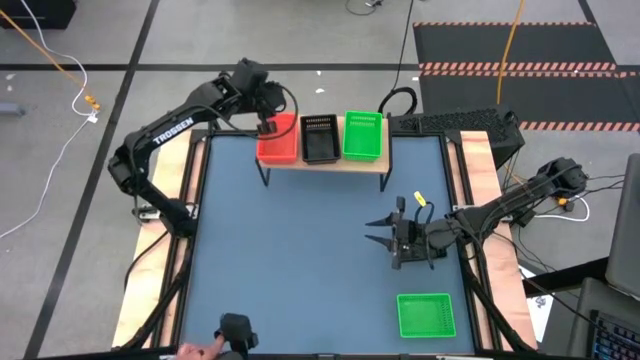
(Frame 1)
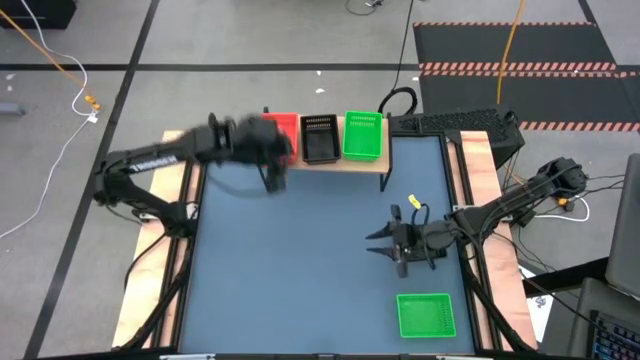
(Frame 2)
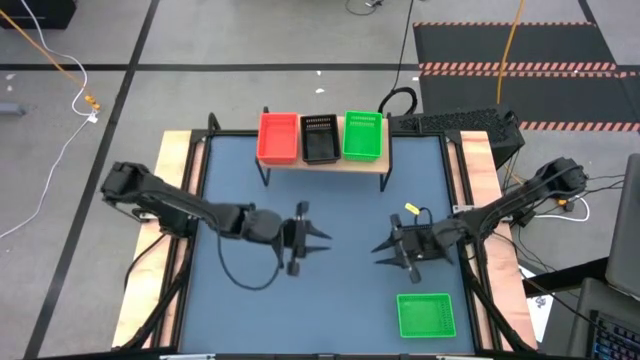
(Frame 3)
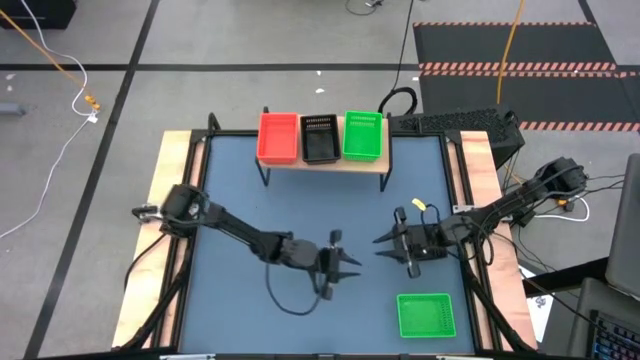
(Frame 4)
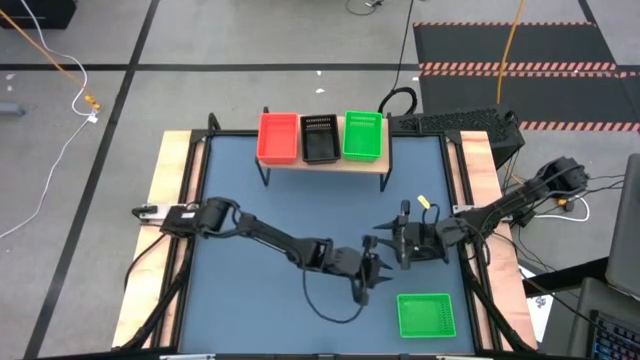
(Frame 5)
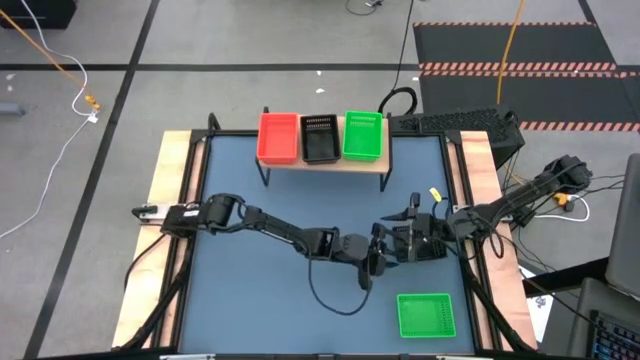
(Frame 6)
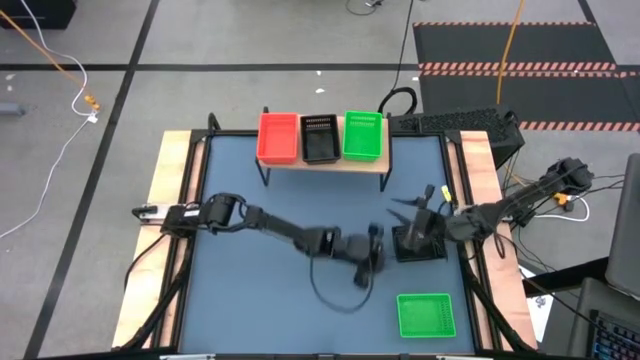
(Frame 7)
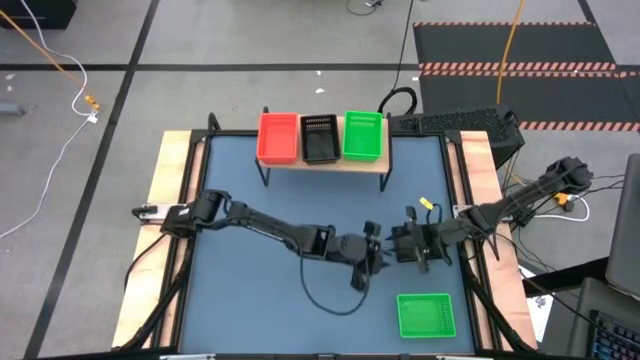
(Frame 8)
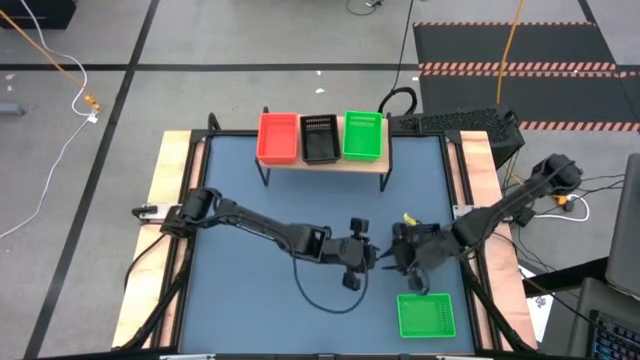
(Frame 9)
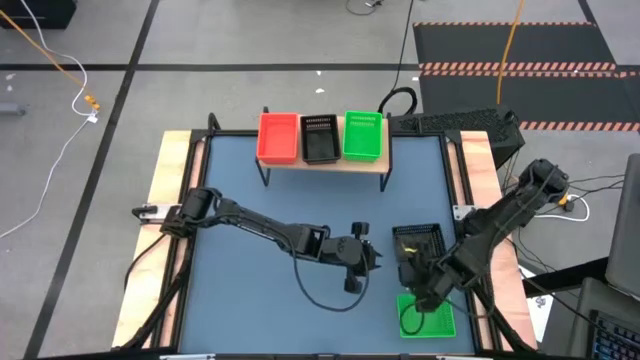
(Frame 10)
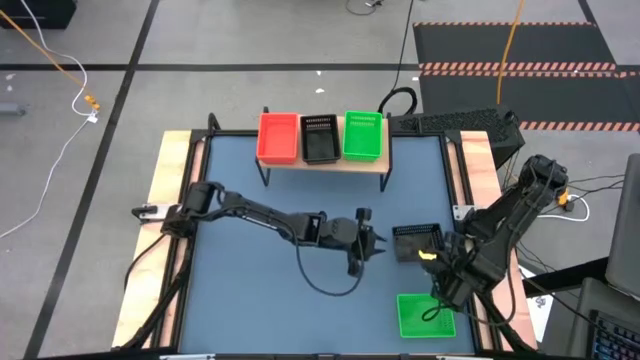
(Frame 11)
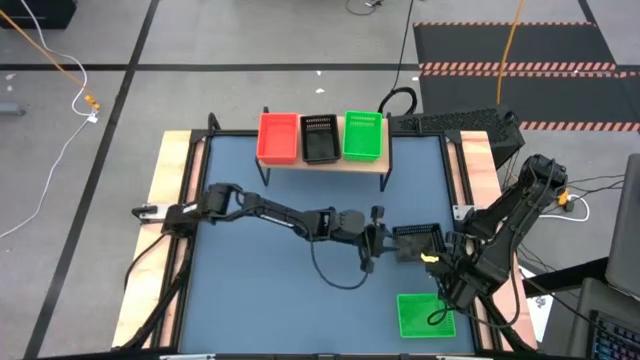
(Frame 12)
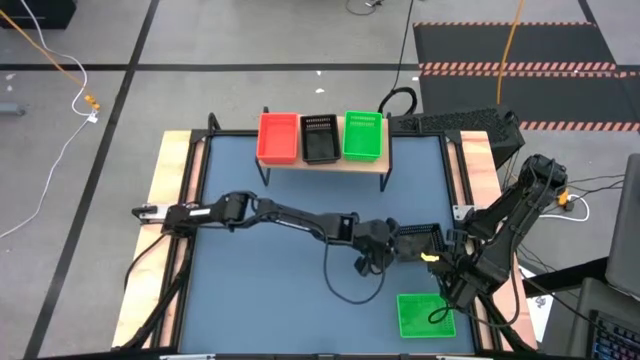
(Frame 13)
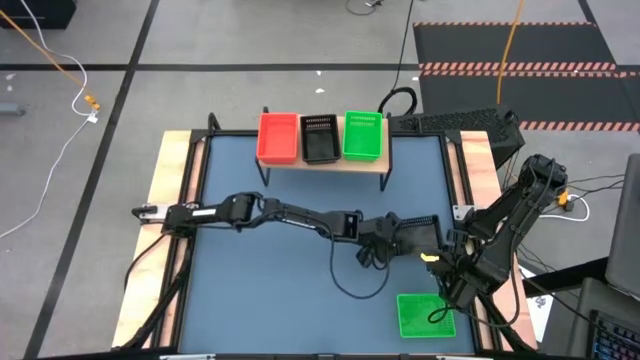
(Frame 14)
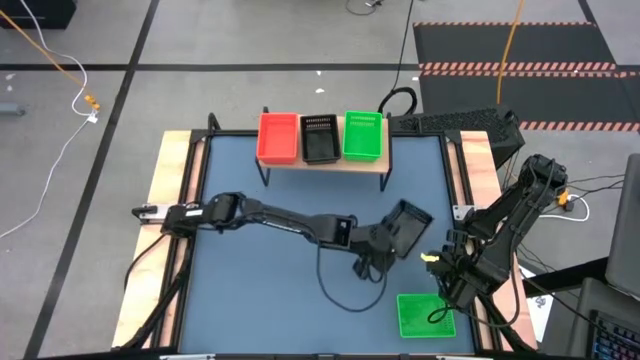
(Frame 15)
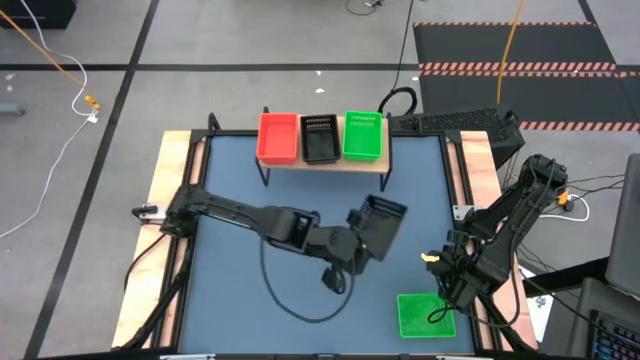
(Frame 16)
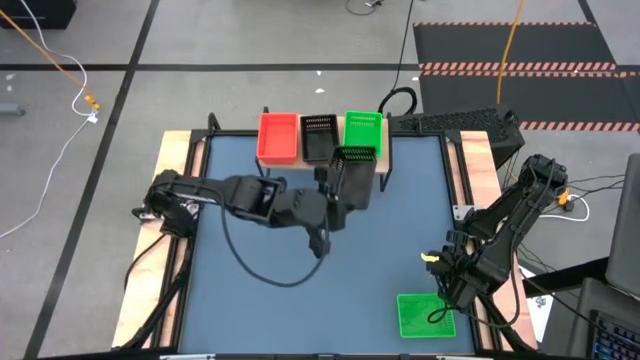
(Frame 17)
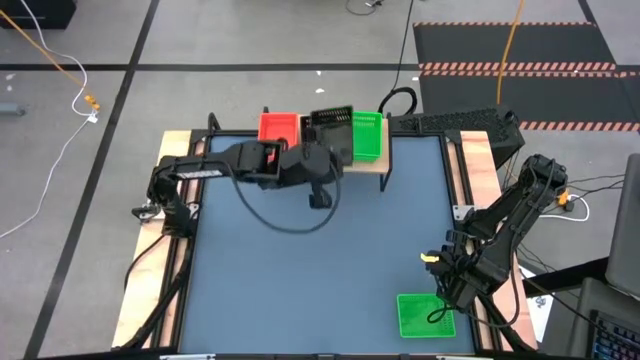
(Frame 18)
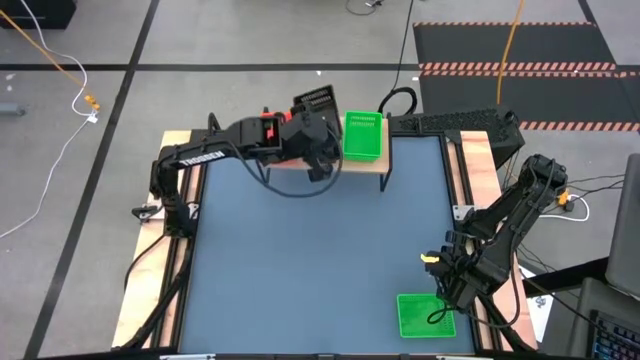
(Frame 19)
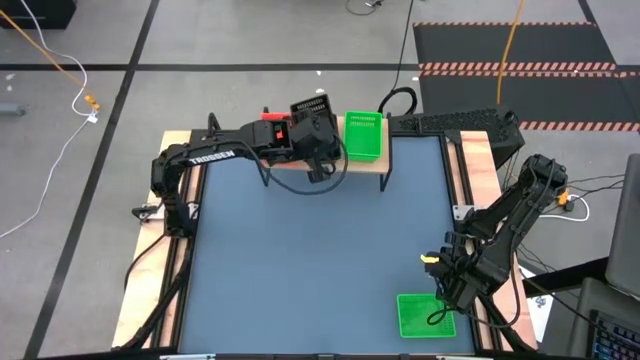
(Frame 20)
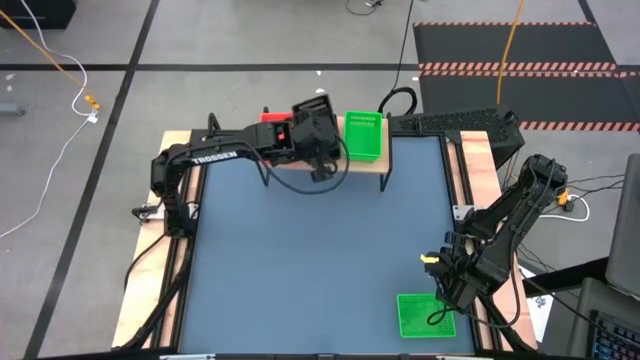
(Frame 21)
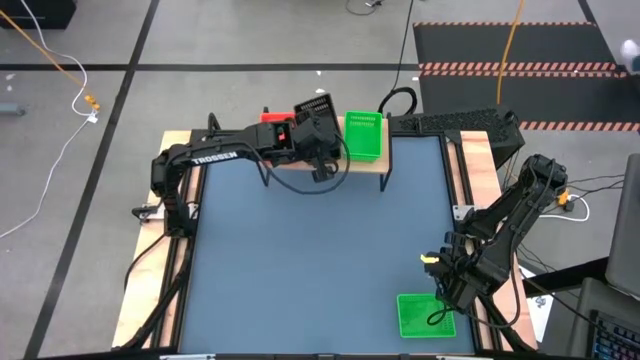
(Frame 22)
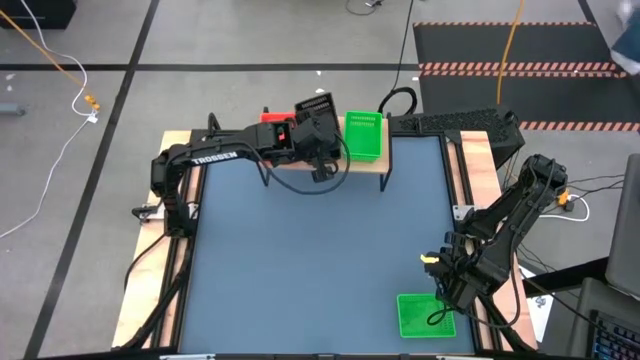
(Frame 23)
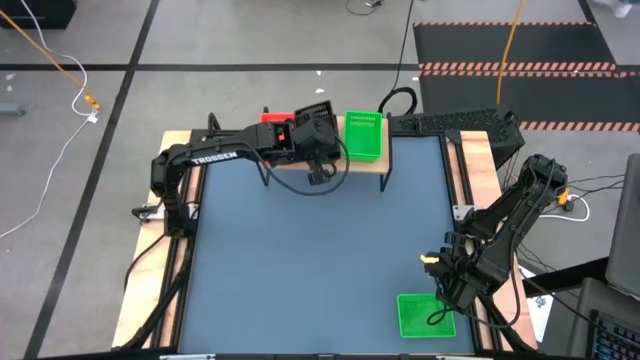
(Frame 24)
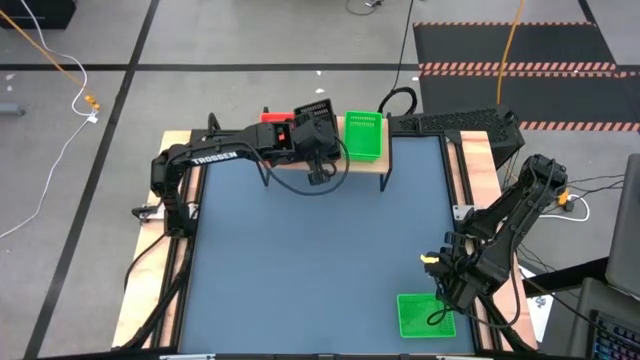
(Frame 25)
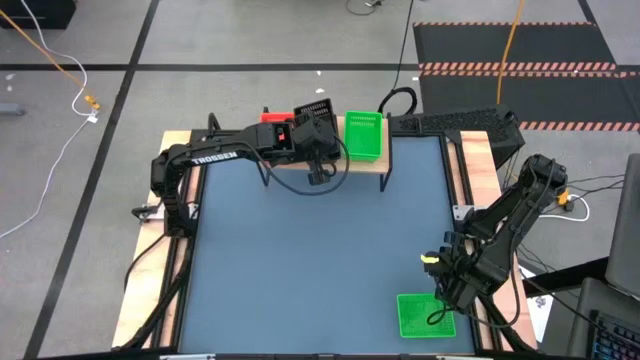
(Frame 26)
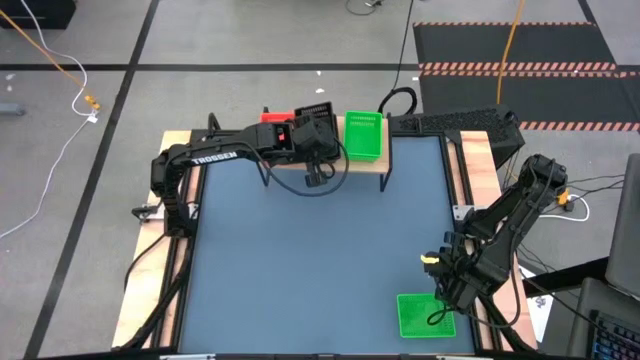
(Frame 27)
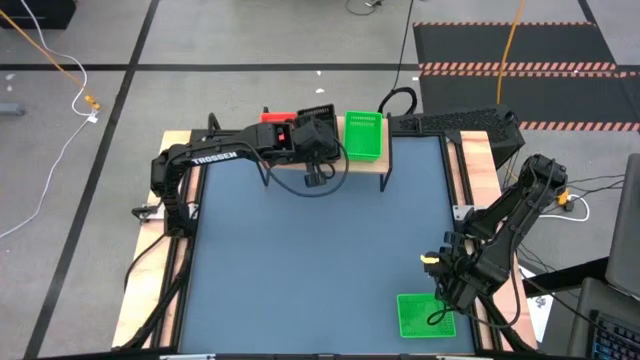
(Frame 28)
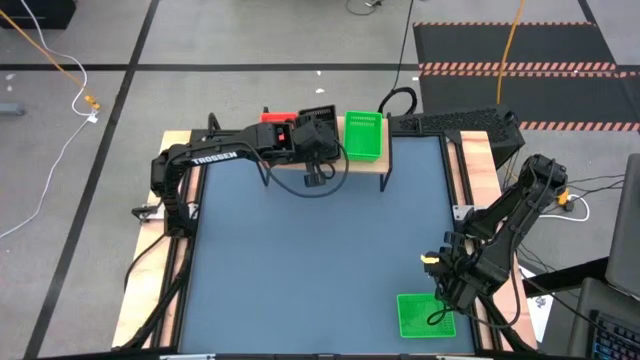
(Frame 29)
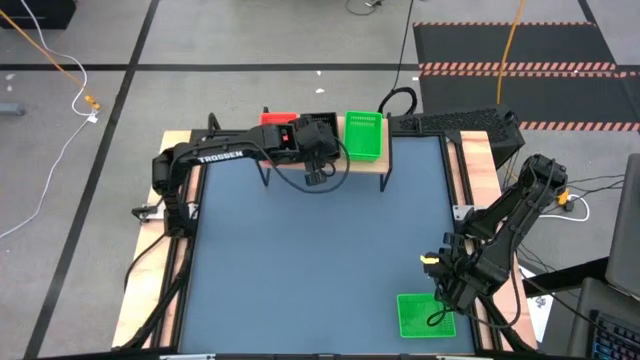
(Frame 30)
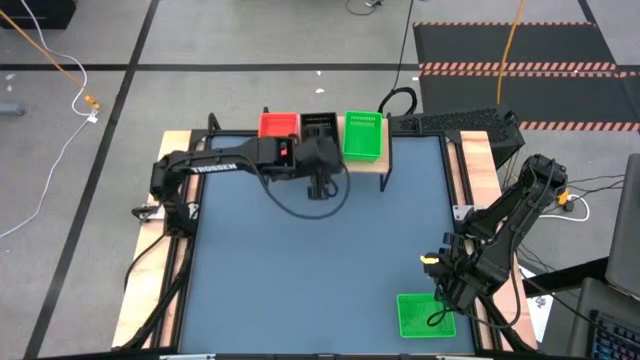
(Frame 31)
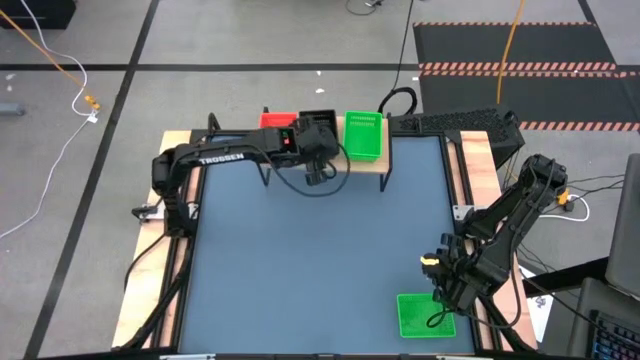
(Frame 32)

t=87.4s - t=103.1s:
Task: Stack baskets on shelf by color
Stack the black bin on the other black bins on the shelf

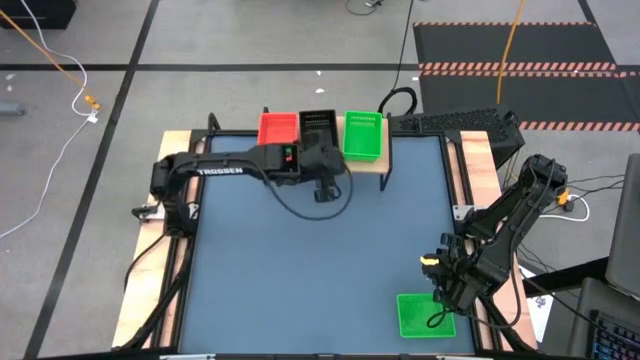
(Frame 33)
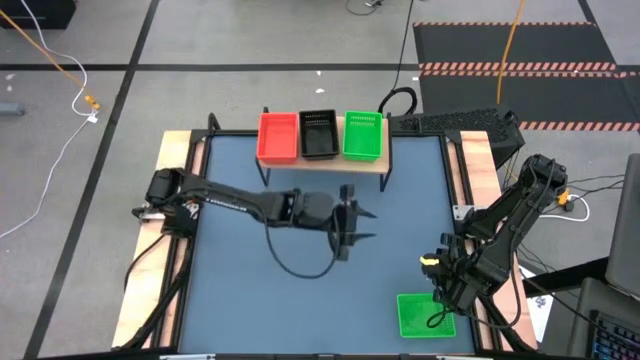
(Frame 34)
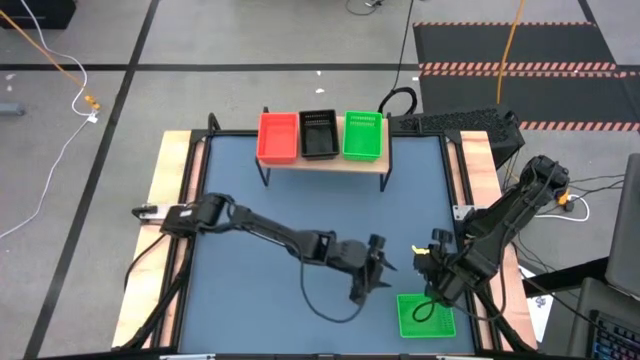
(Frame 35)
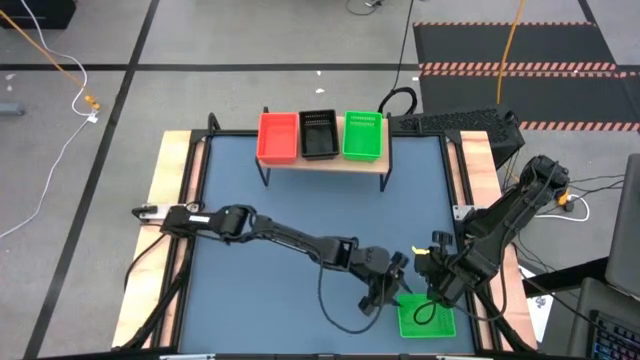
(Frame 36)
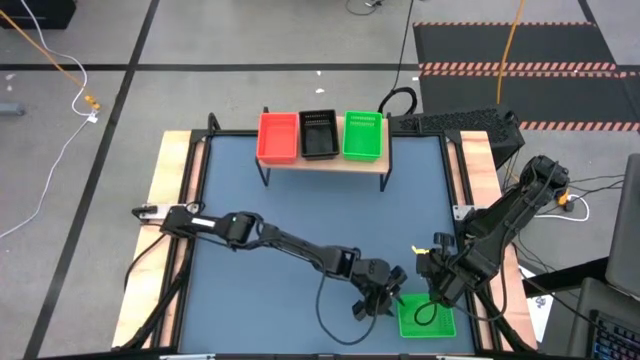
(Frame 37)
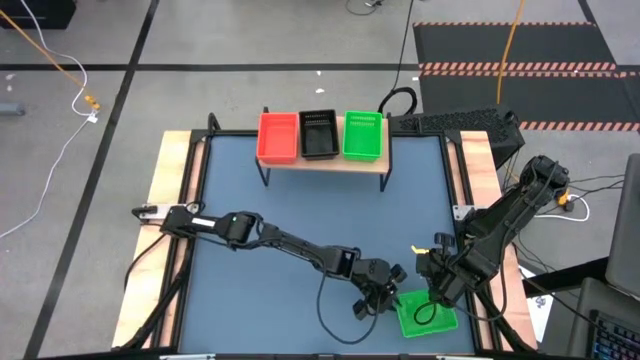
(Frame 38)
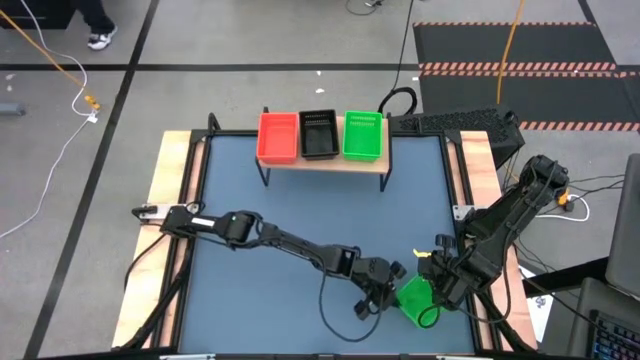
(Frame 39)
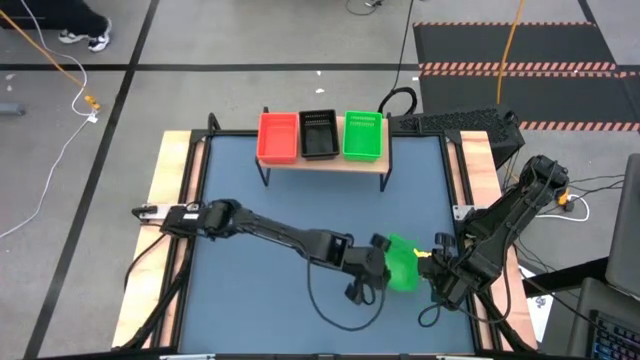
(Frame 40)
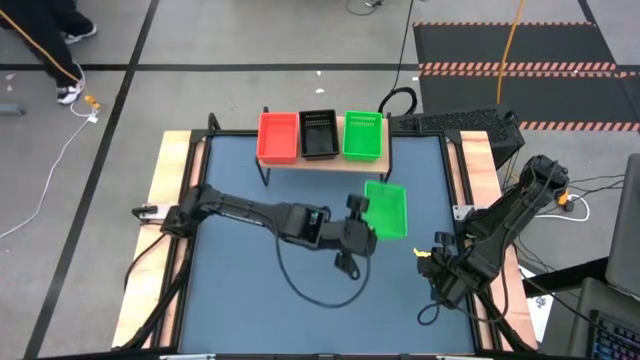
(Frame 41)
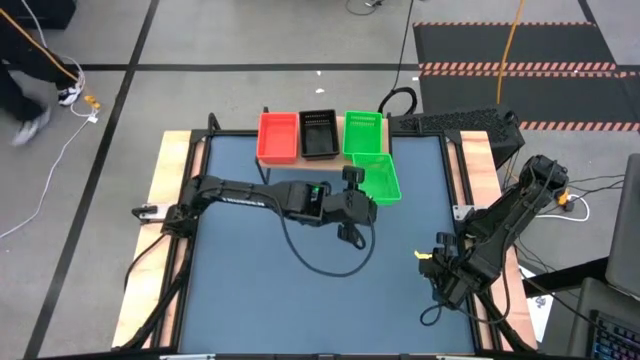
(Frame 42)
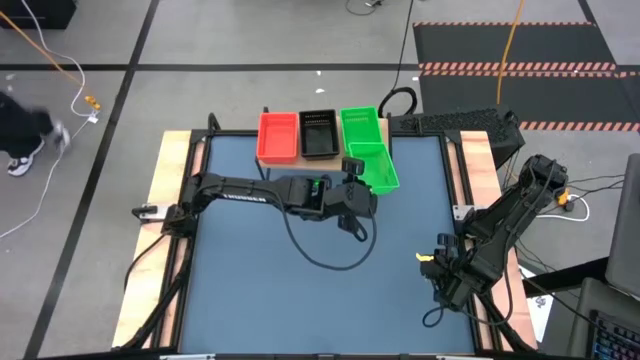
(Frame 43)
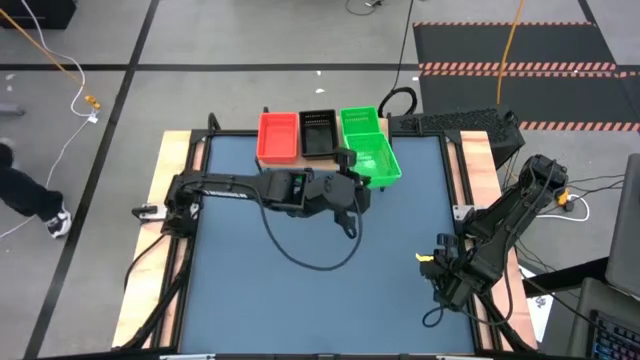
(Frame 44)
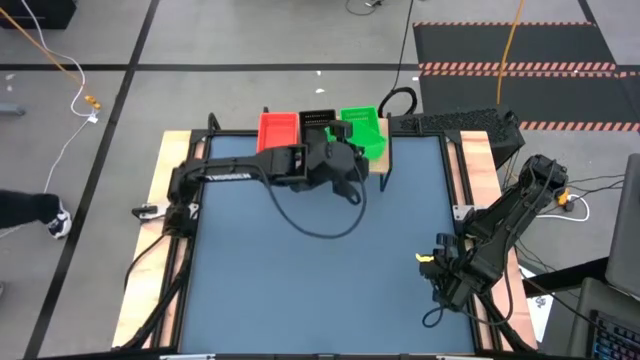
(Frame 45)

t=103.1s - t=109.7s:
Stack the green bin on the other green bins on the shelf
